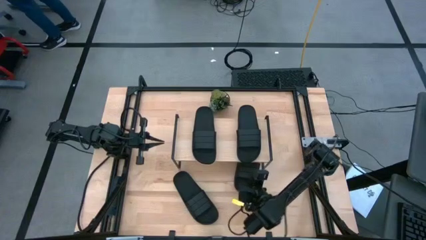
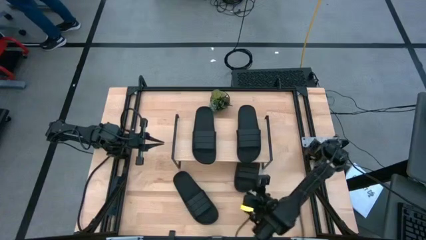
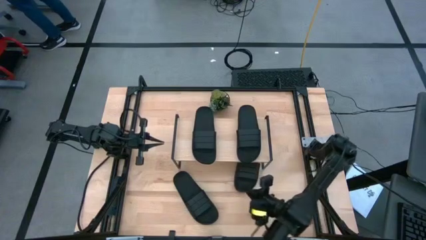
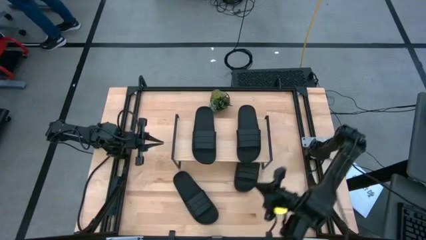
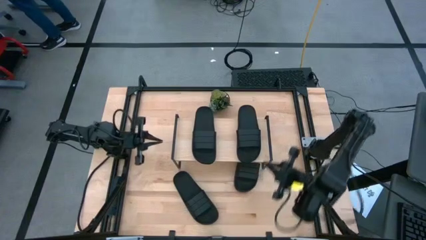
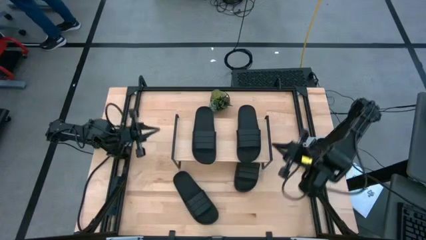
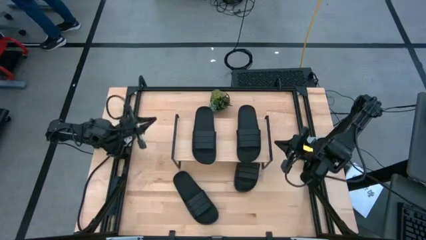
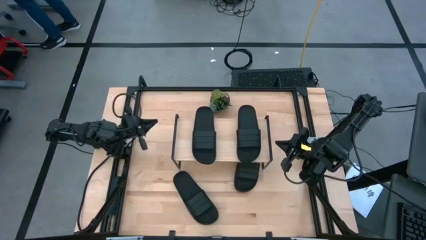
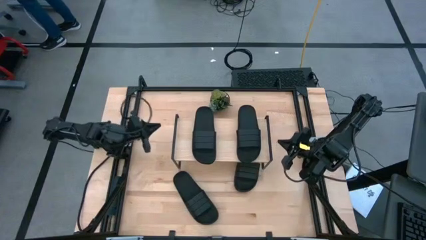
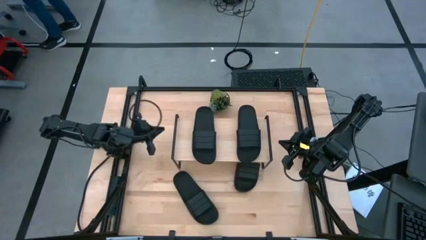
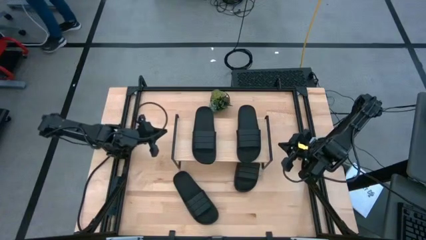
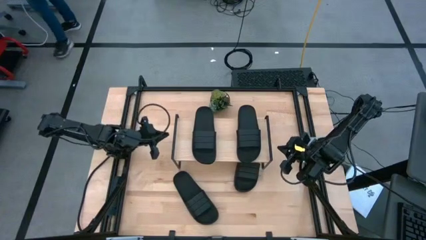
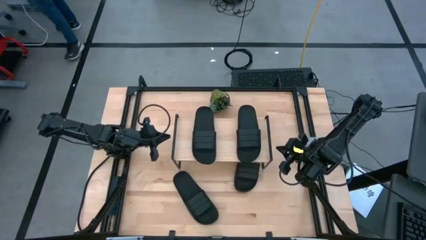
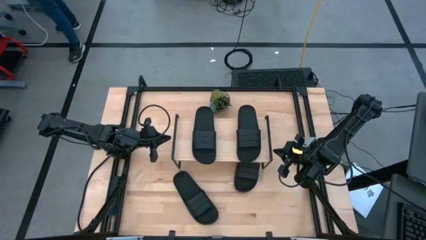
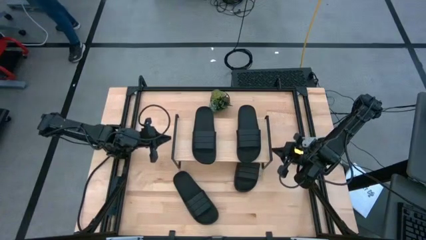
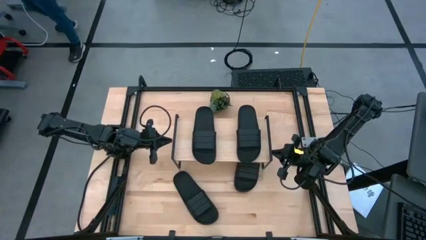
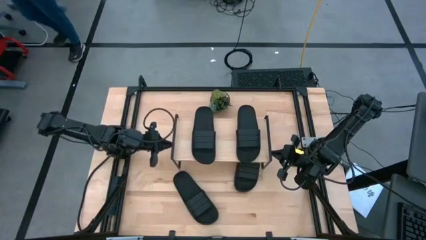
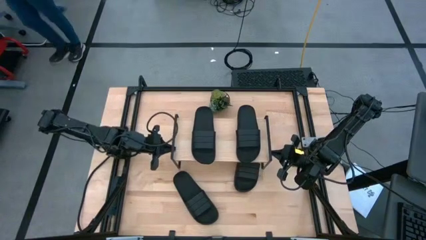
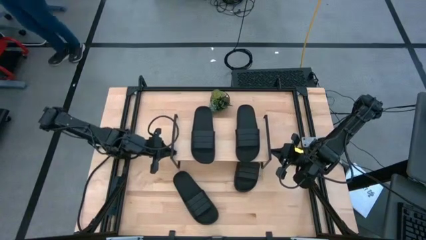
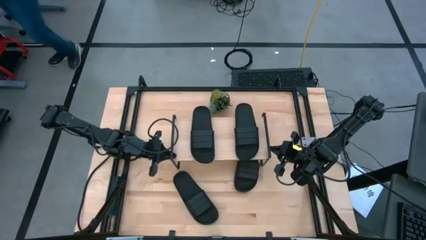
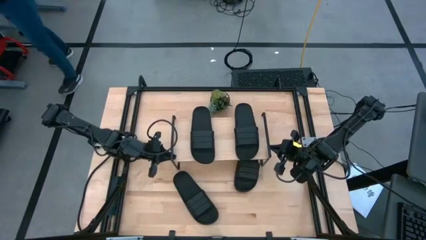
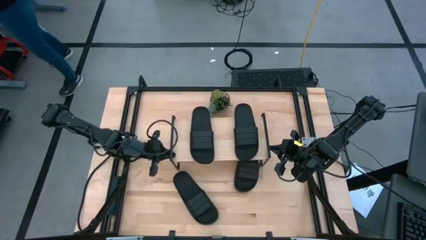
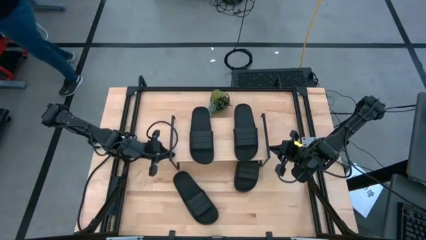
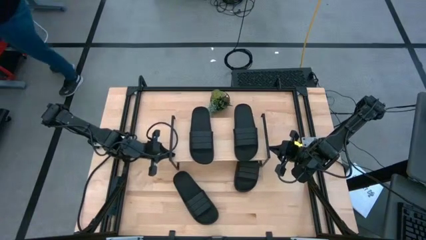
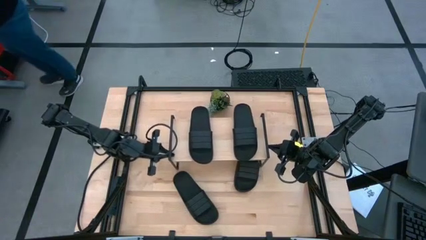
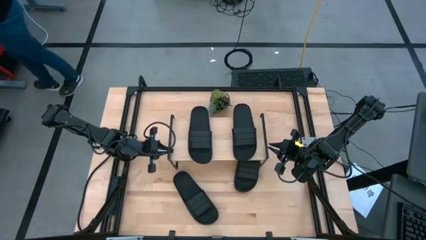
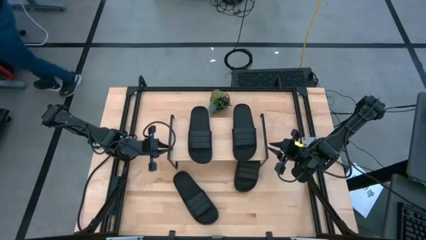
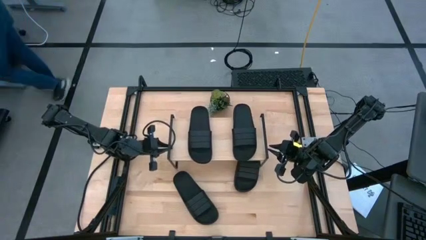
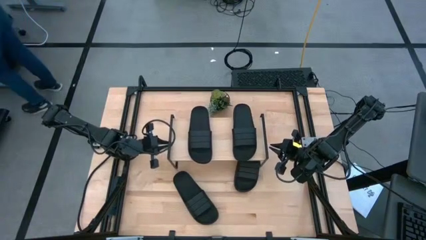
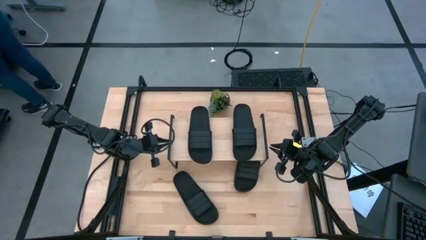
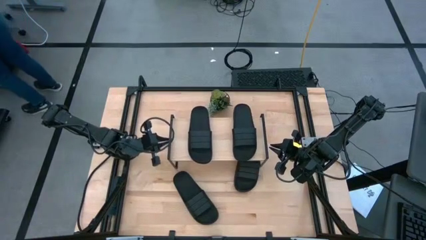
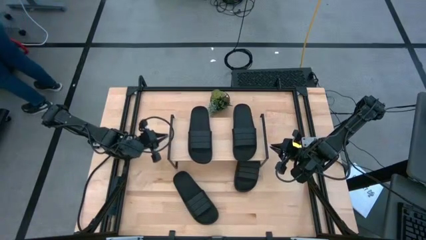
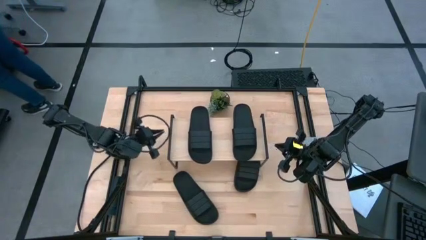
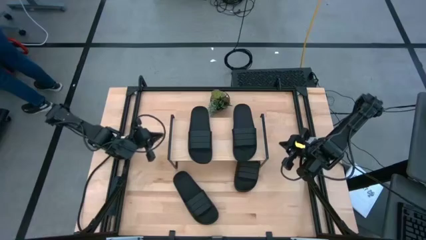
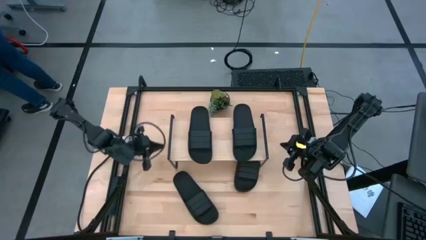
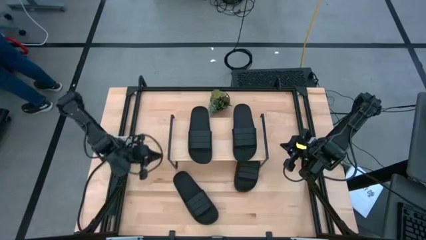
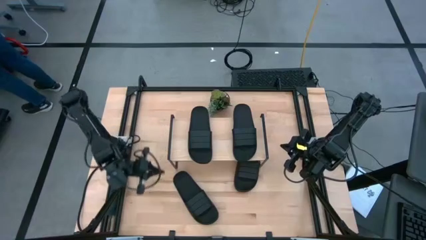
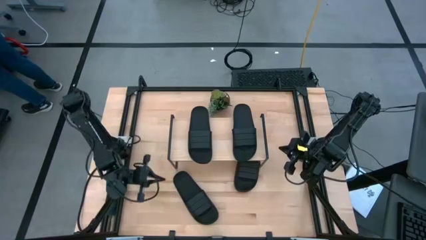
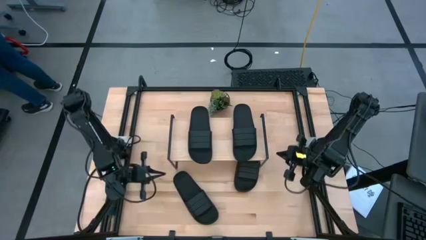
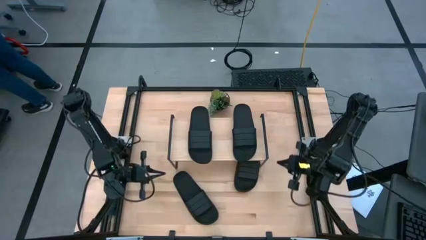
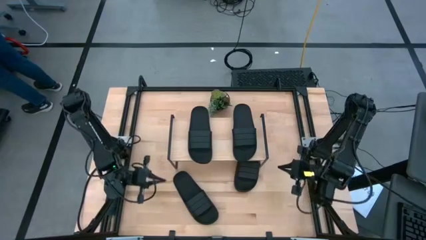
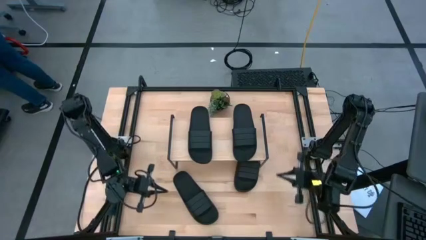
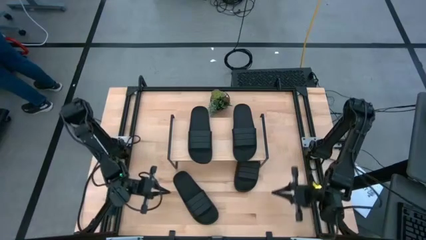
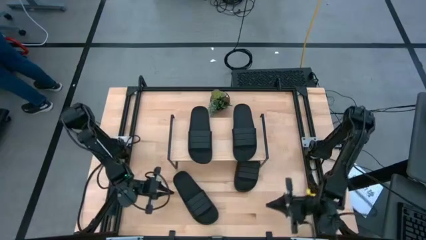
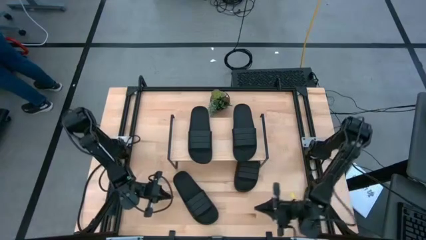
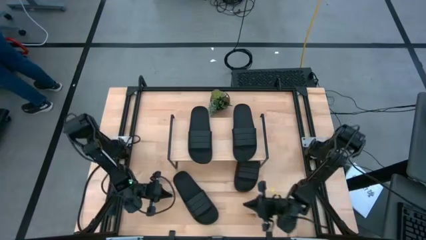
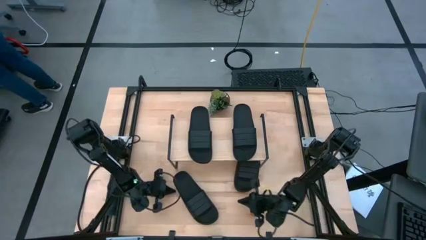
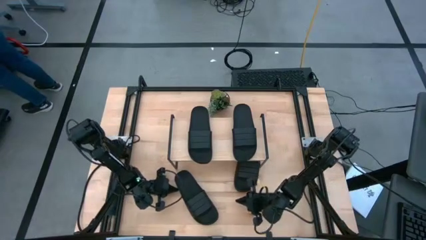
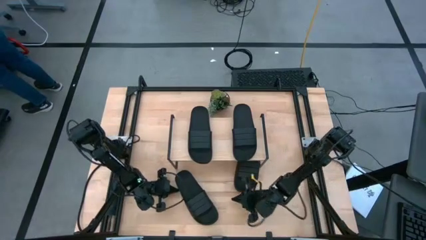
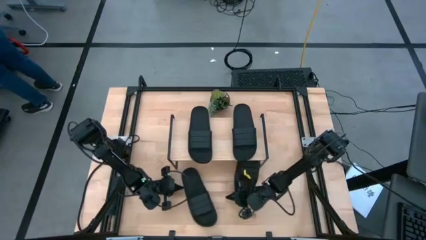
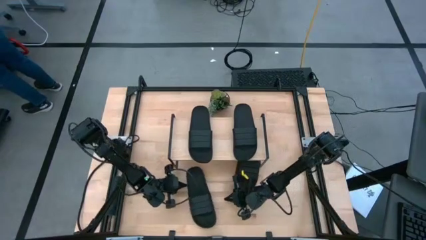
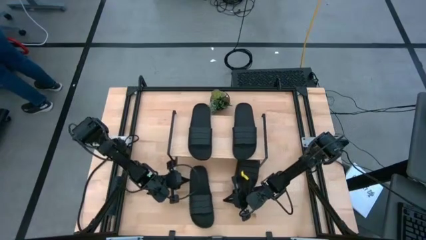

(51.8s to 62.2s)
Task: Pick and place slides into the shelf
Adjust the shelf

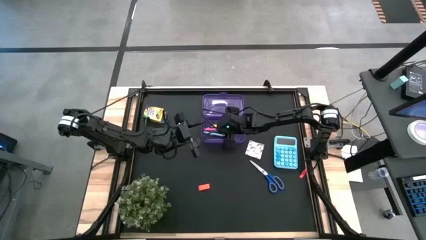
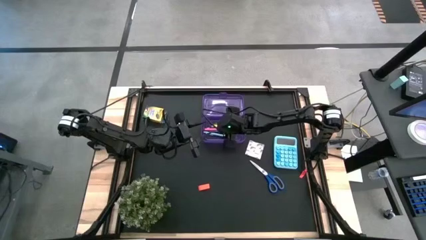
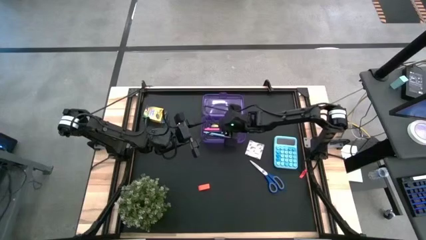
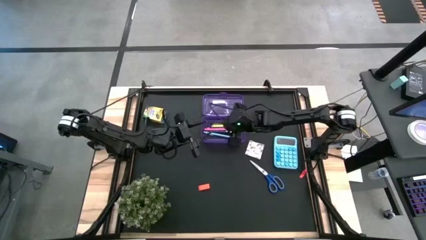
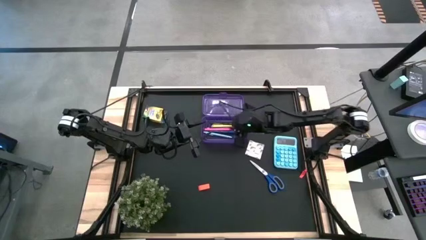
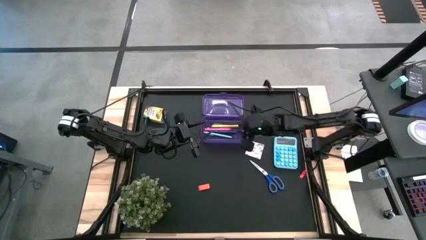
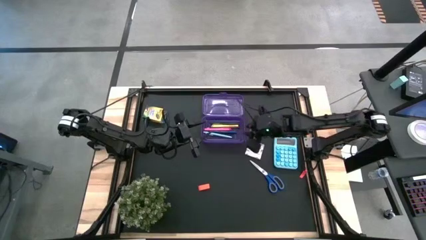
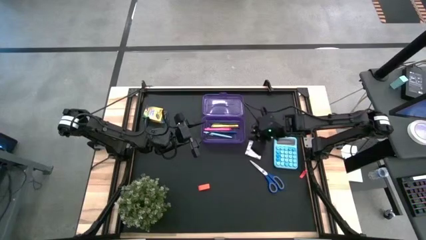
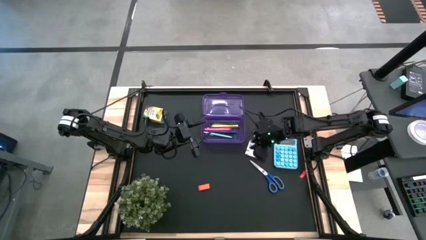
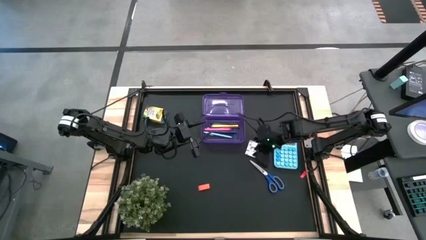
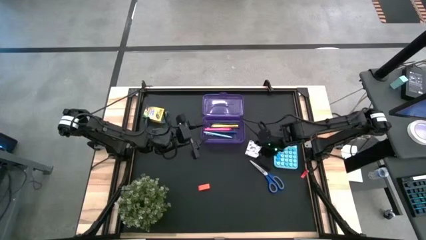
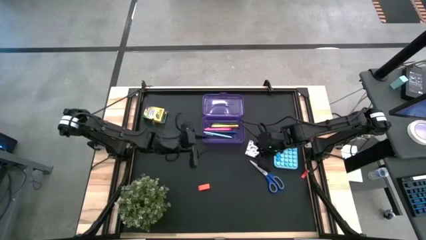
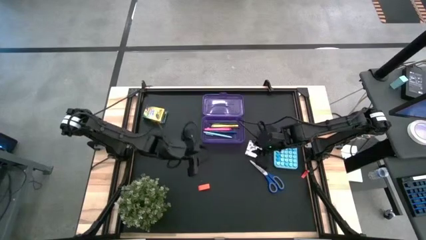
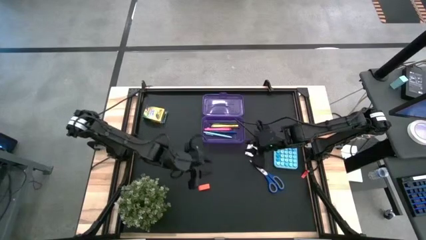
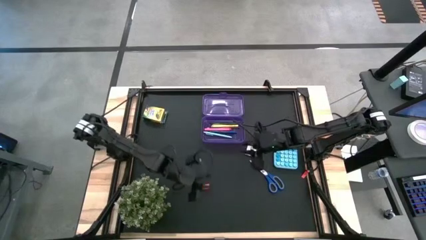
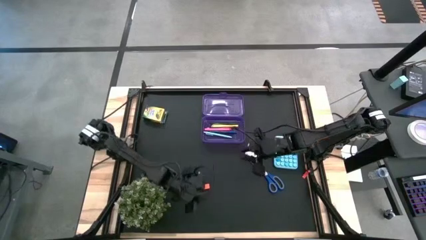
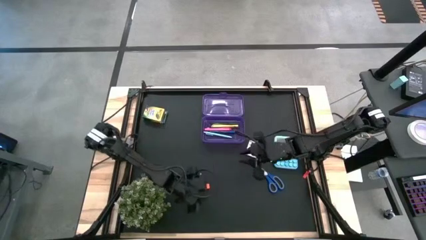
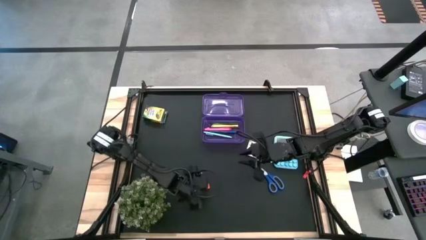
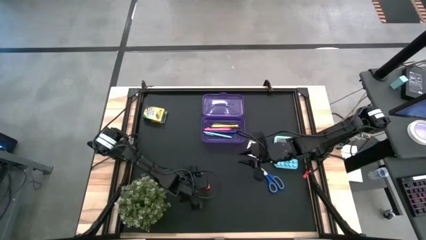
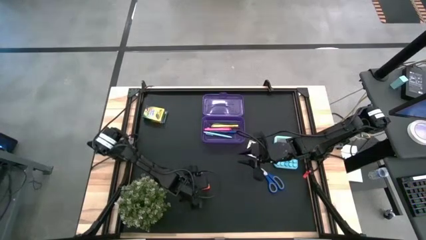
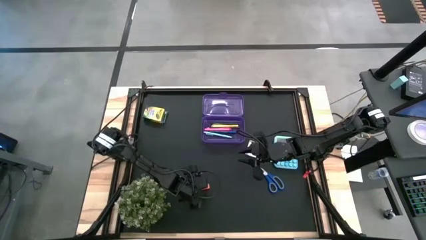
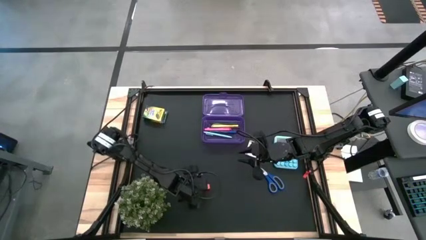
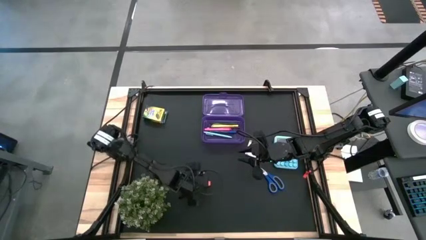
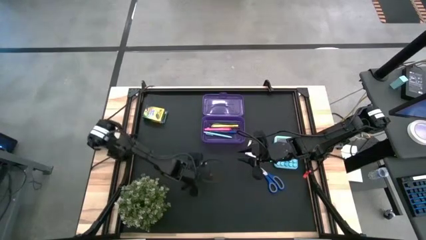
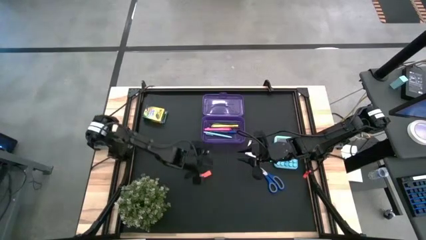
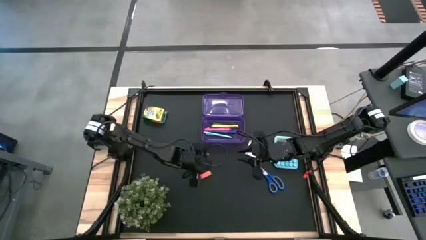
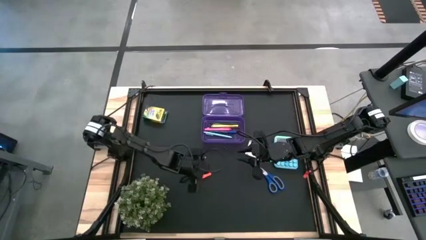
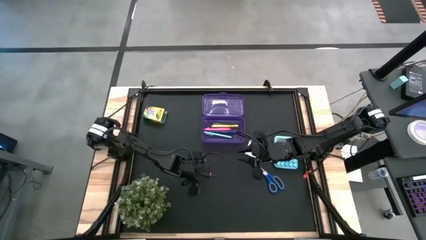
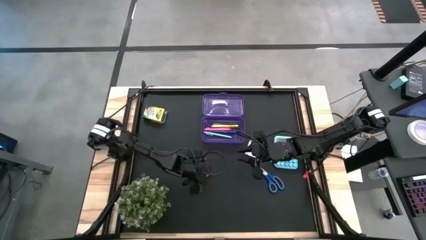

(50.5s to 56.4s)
Task: Pack school essentials
Put the orange eraser into the purple box
